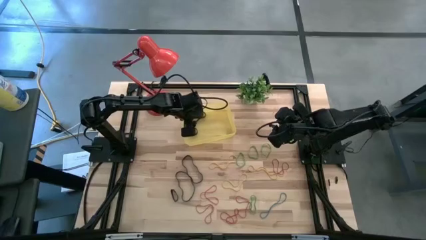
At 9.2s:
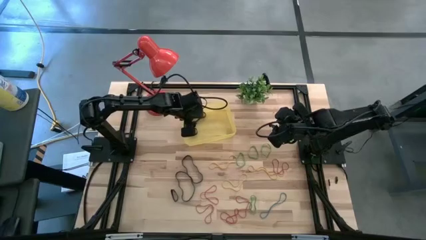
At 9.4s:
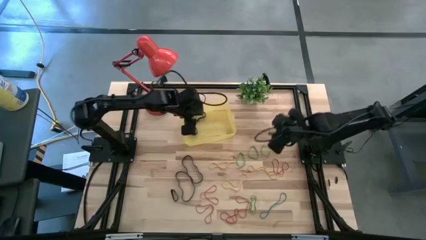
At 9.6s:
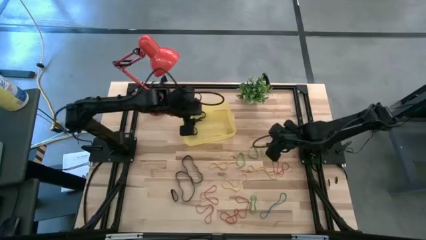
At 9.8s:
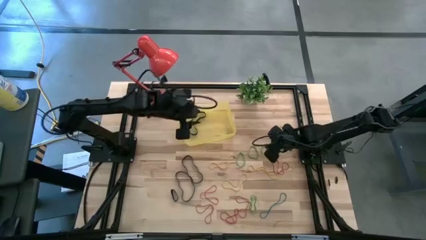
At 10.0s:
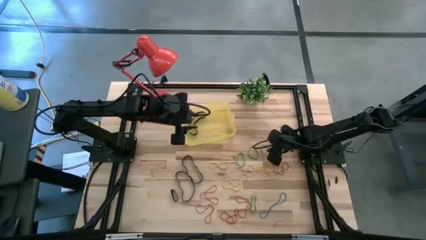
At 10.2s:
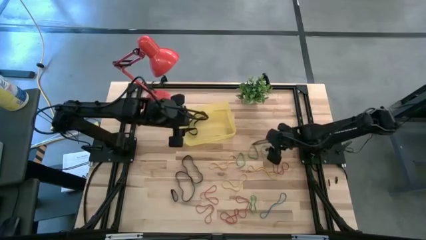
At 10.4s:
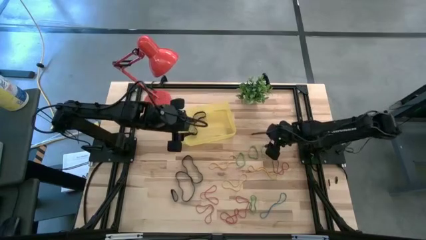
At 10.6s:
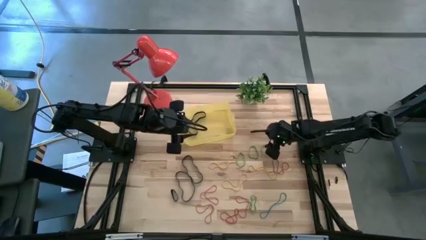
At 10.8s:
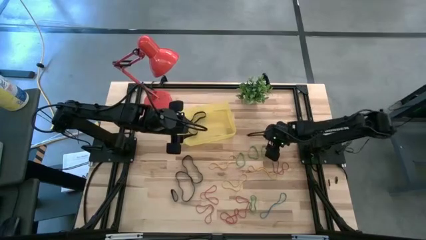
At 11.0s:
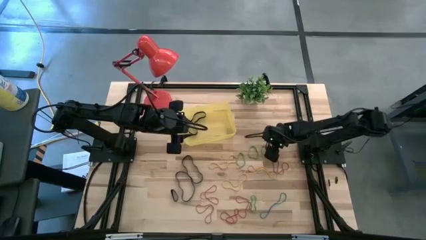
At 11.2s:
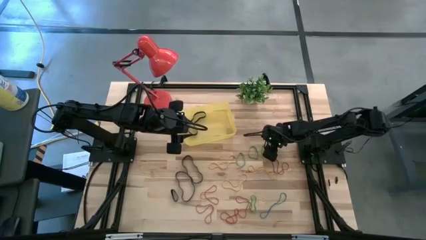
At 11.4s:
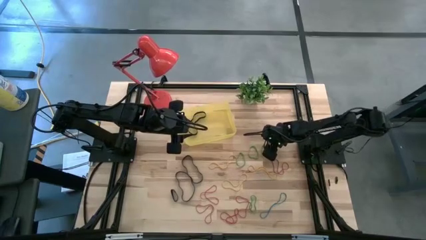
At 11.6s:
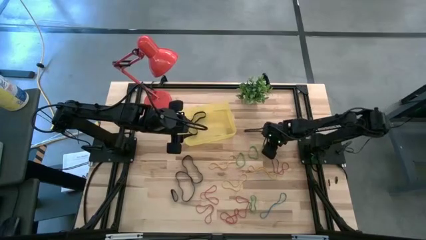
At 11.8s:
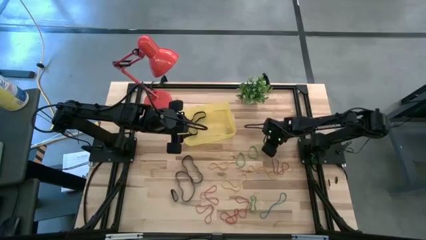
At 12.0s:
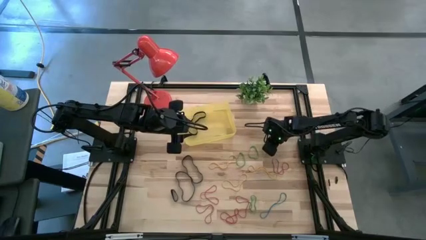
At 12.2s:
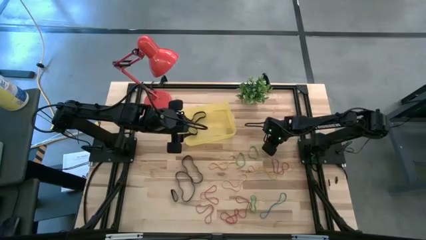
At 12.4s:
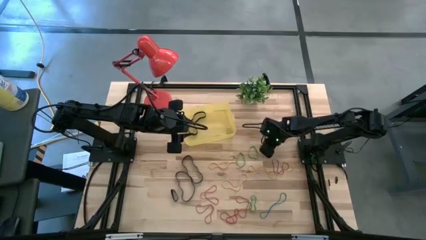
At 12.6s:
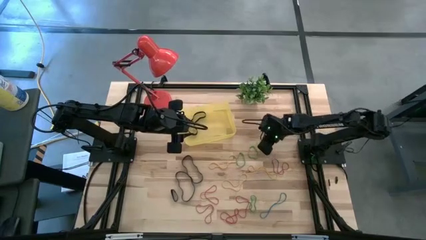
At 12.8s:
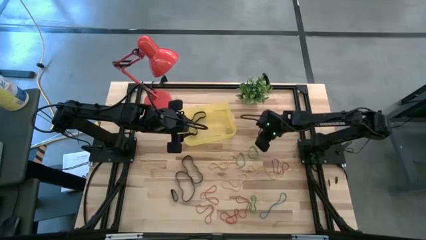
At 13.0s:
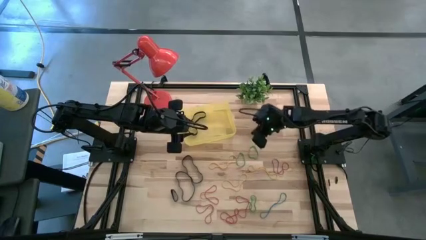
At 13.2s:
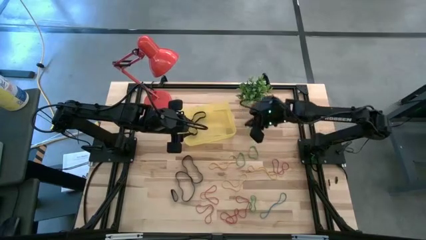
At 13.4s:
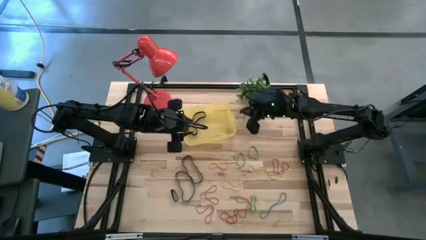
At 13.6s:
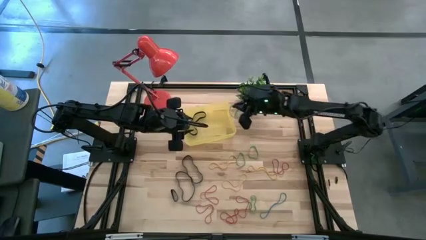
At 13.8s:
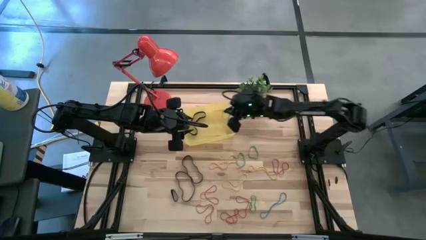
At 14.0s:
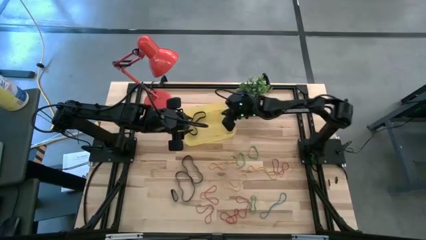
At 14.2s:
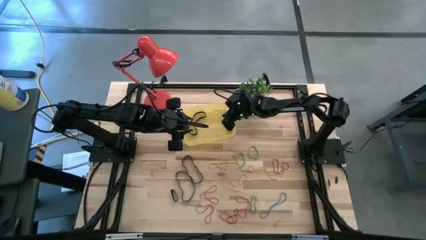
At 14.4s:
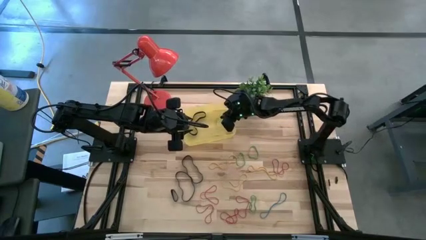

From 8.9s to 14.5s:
Task: Pick and place rubber bands into bin
Put the green rubber band into the yellow bin

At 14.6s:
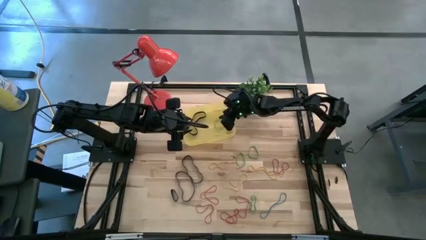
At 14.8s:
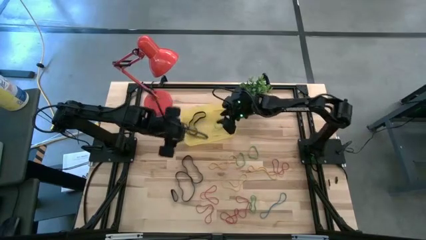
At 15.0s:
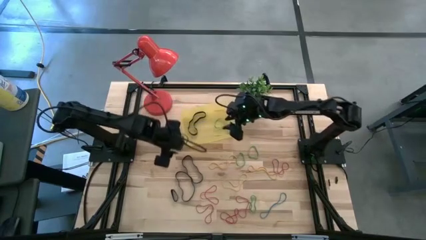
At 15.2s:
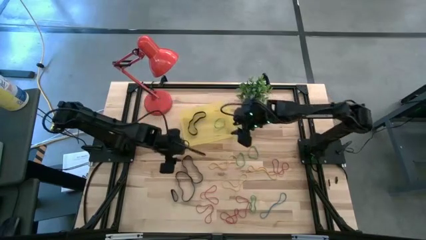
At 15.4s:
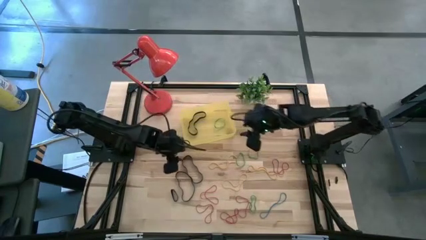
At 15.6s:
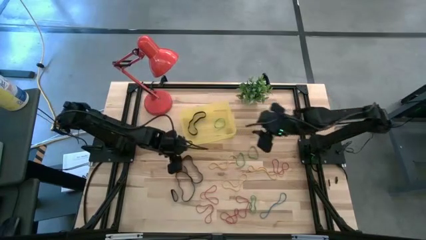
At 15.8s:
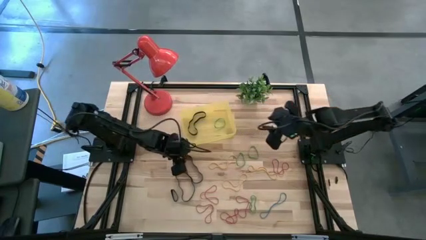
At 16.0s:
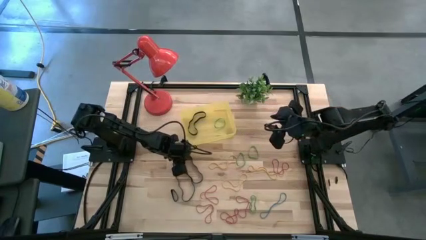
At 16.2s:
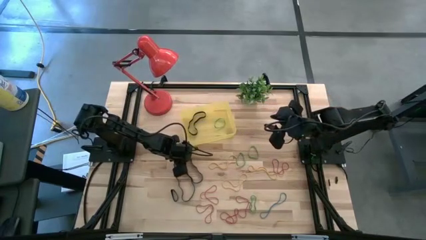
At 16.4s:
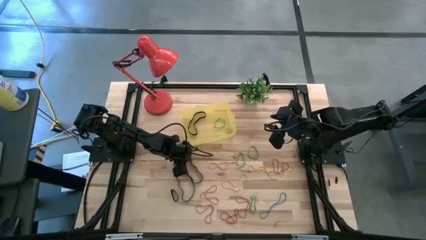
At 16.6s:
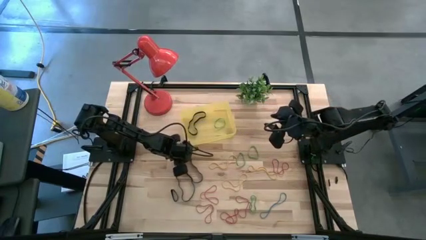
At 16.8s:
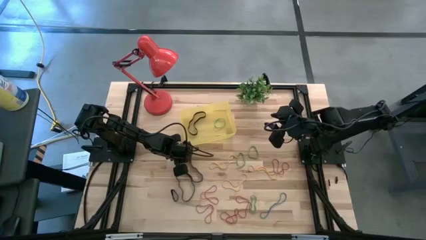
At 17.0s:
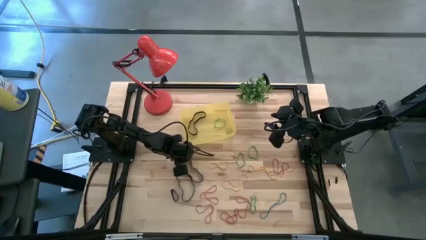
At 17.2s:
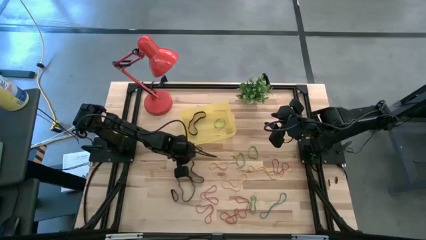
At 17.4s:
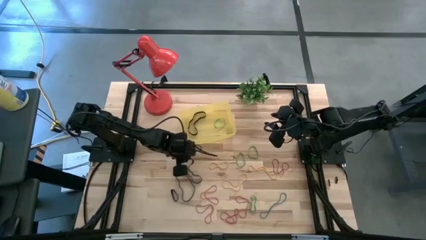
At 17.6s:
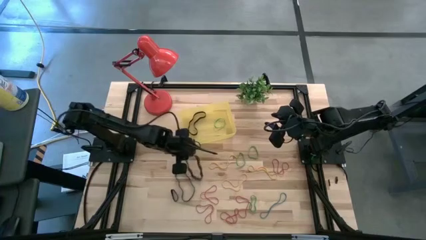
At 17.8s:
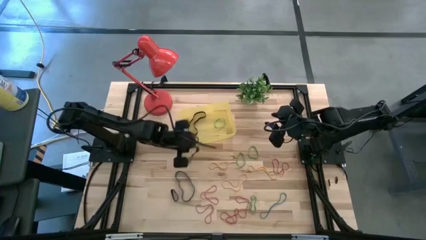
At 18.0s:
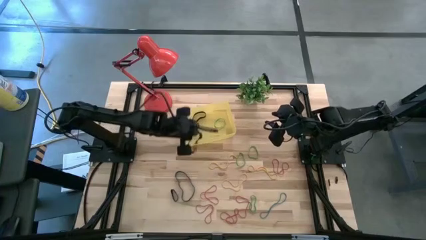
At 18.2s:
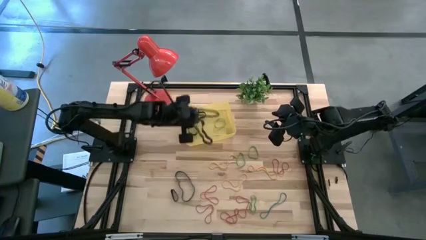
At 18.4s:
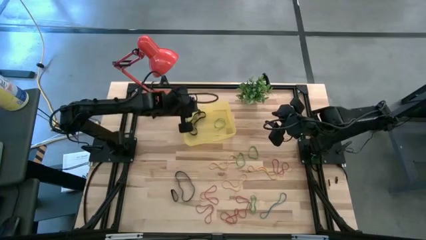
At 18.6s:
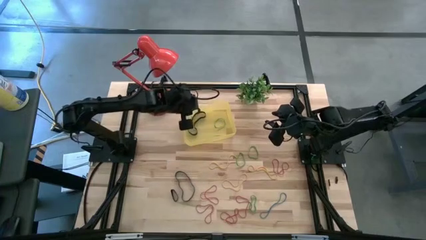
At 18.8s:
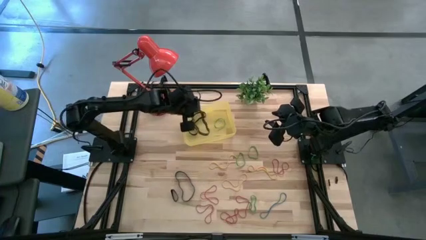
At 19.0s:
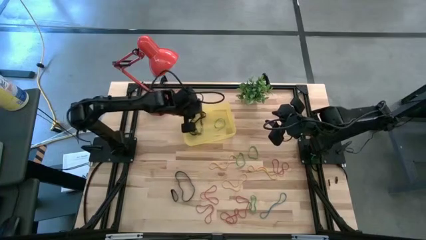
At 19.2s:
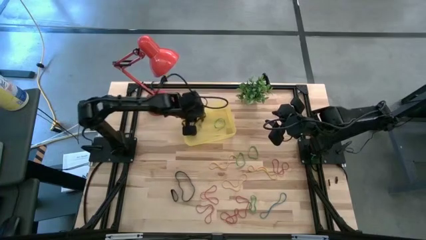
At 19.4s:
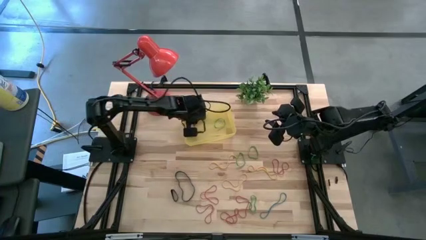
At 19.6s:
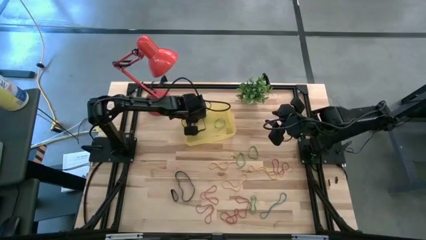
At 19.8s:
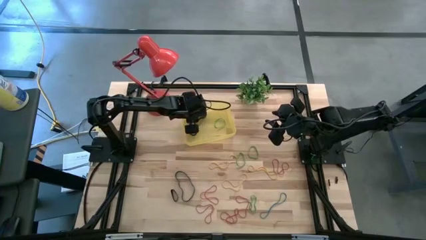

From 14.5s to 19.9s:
Put the black rubber band into the yellow bin

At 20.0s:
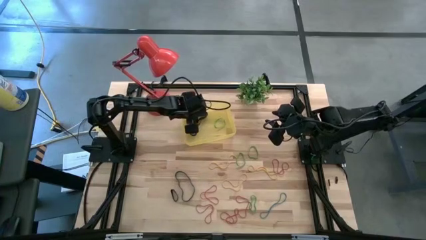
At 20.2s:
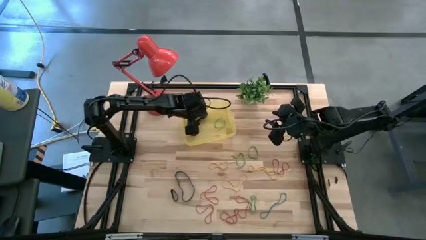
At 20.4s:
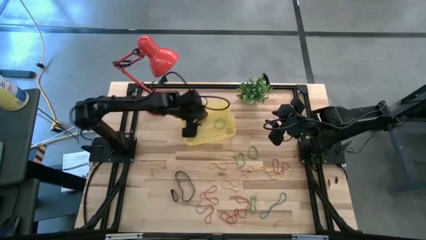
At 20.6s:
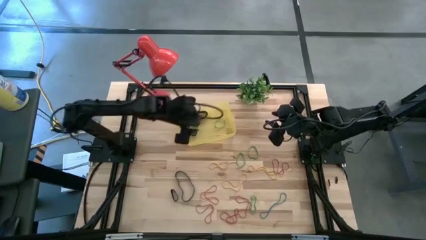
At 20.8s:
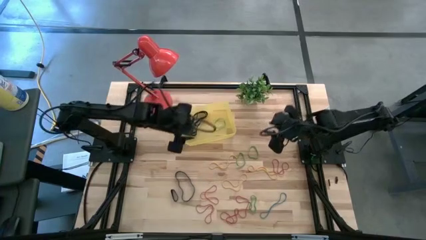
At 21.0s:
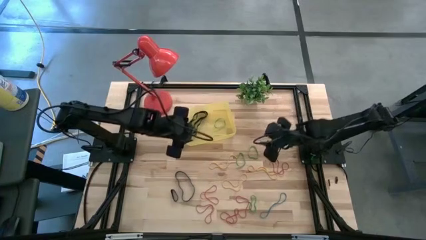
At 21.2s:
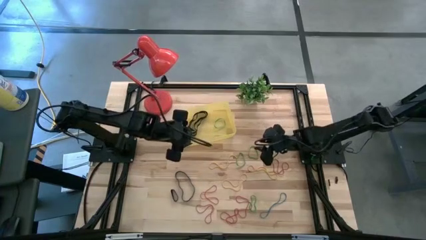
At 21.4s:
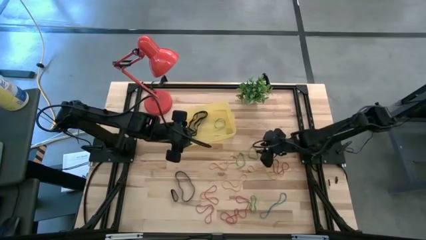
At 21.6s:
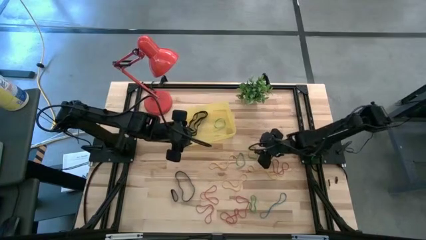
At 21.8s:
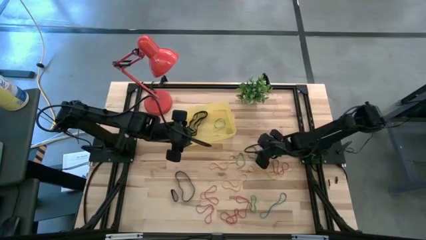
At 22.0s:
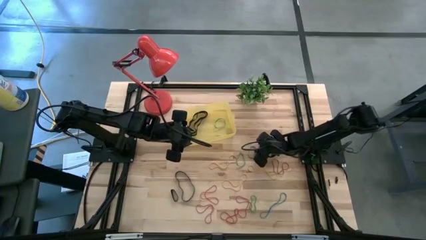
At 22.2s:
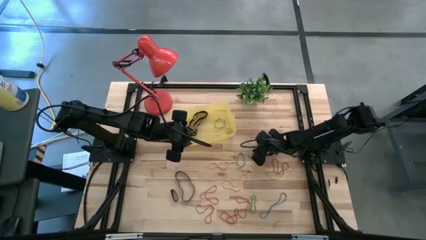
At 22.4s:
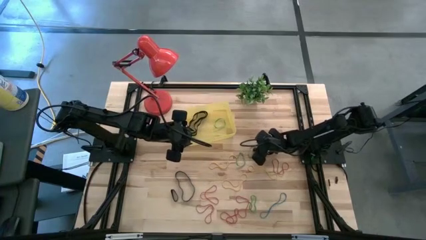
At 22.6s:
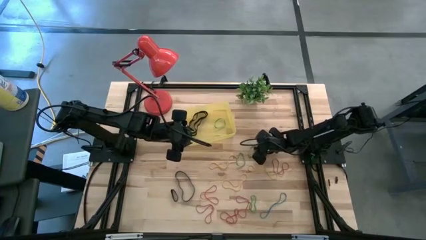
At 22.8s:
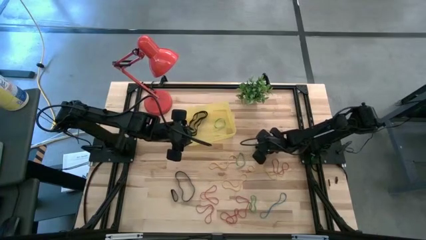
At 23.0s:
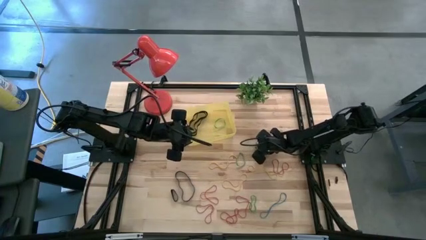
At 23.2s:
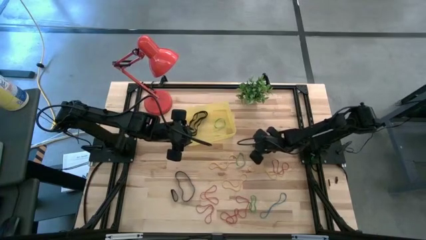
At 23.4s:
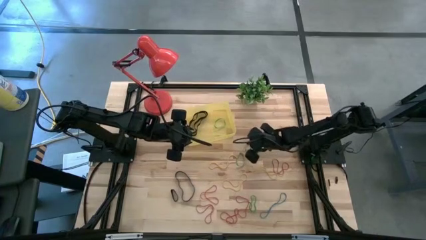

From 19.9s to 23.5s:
Put the green rubber band into the yellow bin

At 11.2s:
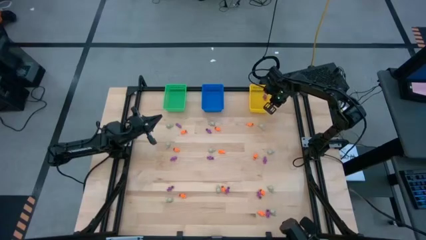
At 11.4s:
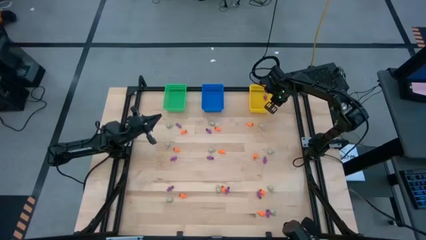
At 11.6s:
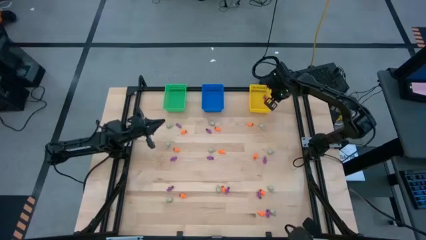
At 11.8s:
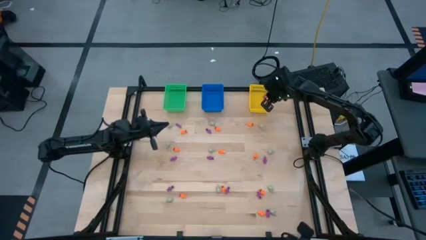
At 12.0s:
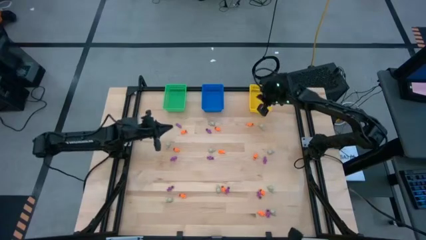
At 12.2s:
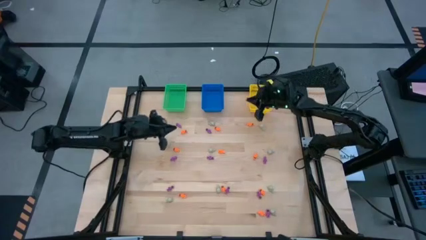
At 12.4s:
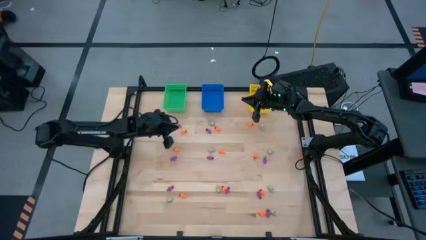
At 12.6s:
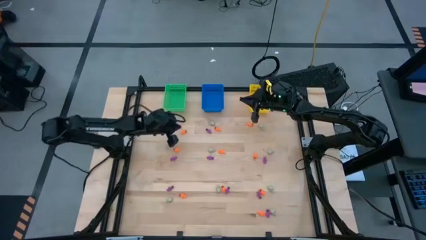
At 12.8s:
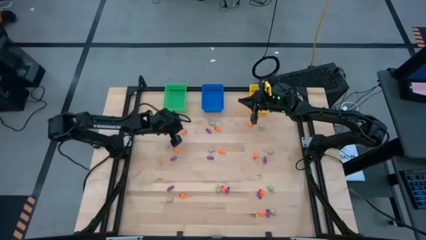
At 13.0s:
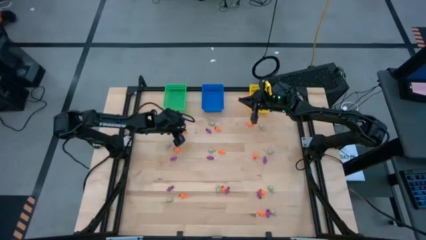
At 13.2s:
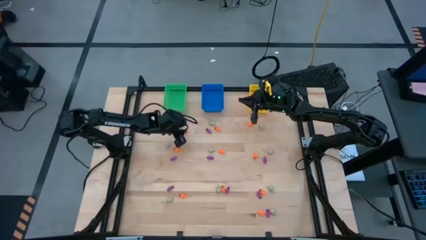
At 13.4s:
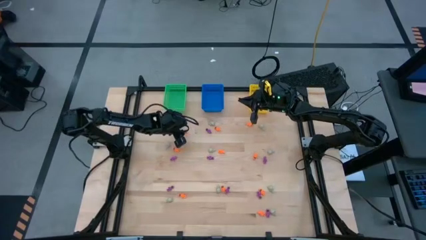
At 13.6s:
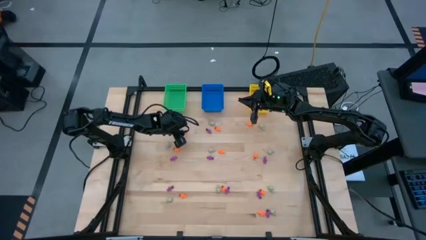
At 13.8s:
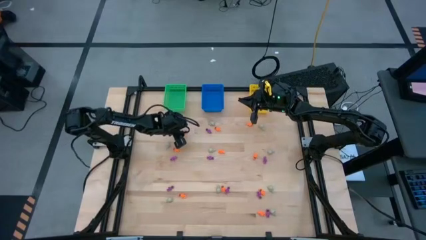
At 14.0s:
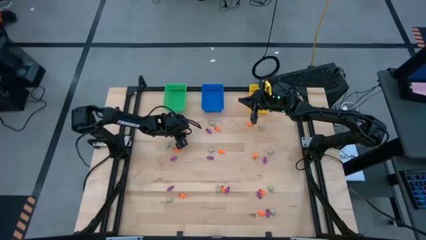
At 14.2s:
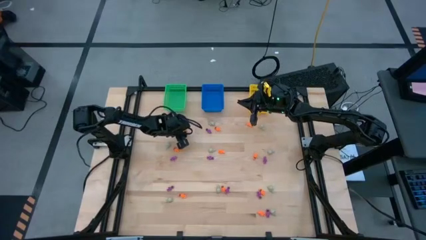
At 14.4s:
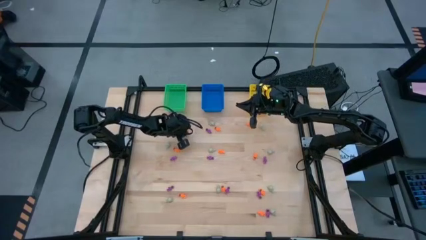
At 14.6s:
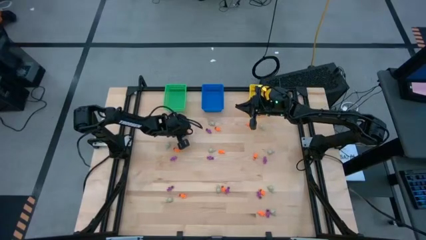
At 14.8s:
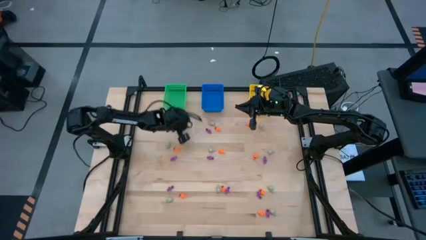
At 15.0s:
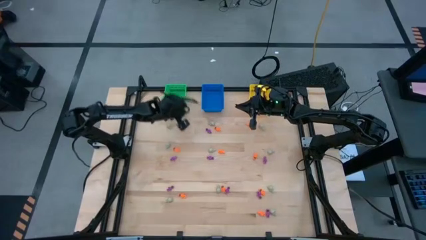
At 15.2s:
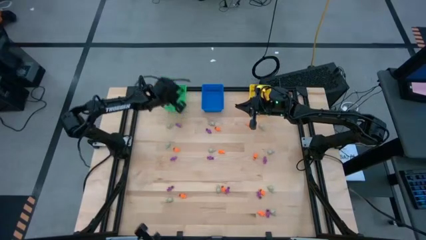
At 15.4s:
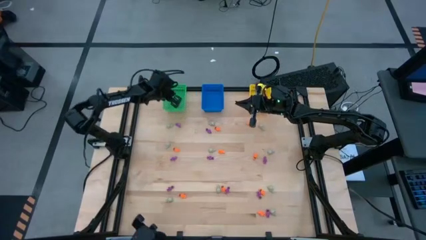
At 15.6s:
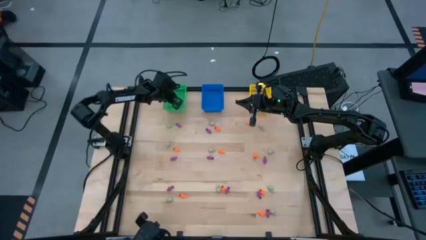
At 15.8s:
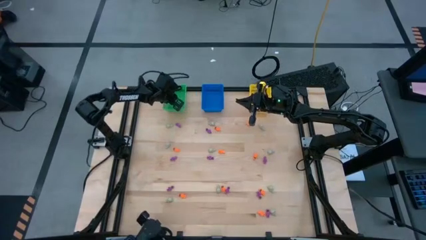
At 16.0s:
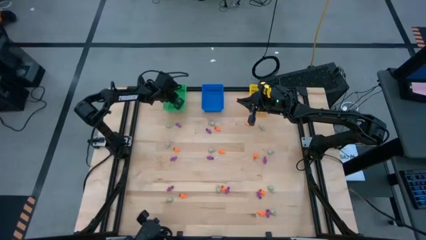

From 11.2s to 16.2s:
Task: Sort Halloween decoration
Put the orange skeleton toy into the green bin
